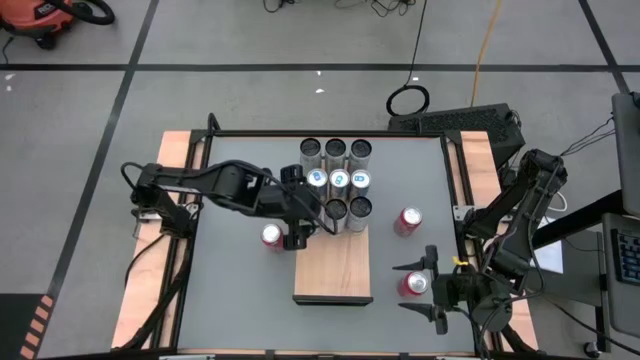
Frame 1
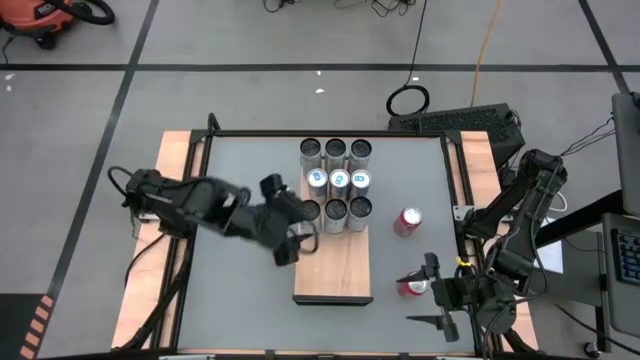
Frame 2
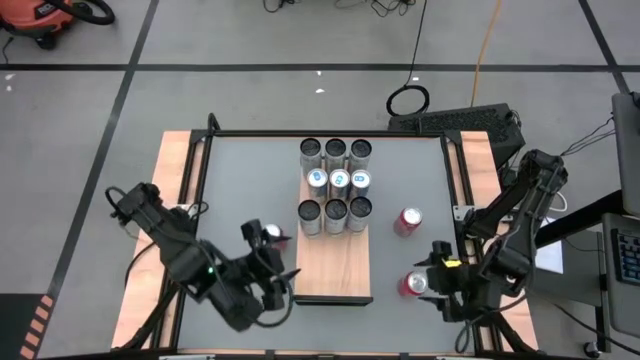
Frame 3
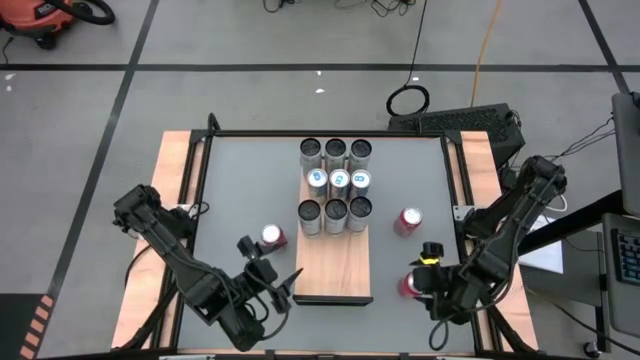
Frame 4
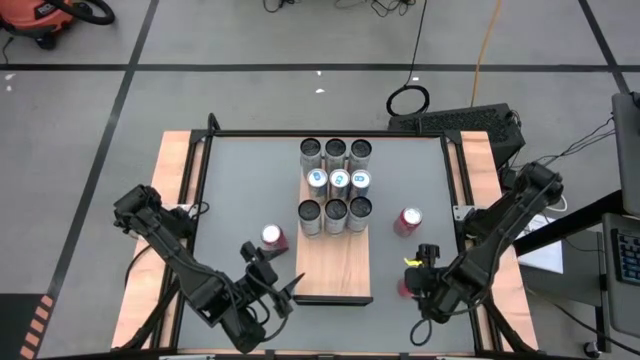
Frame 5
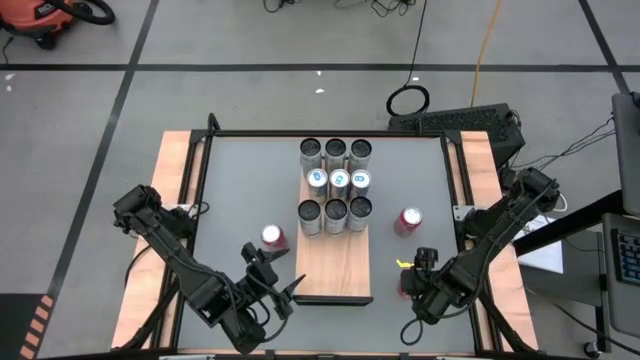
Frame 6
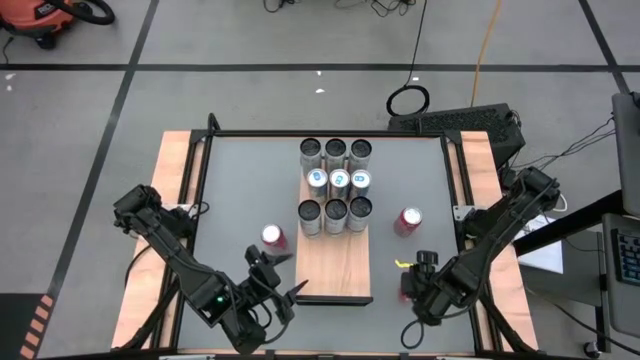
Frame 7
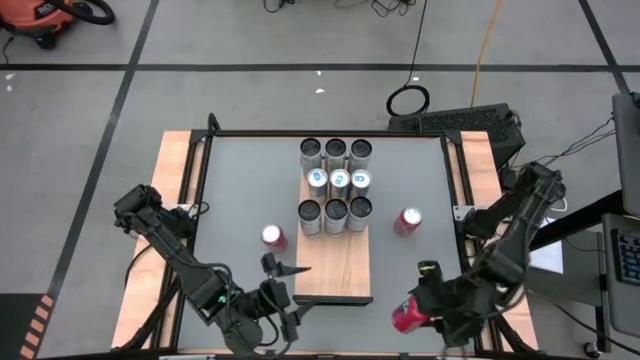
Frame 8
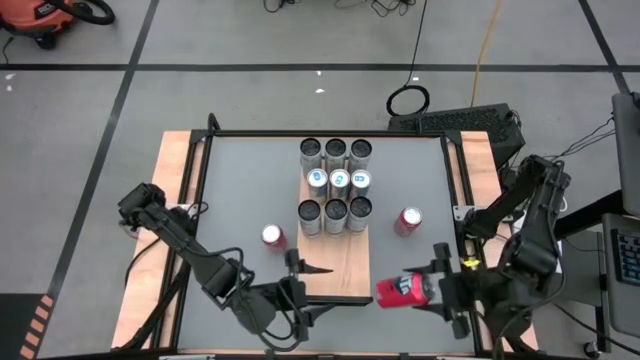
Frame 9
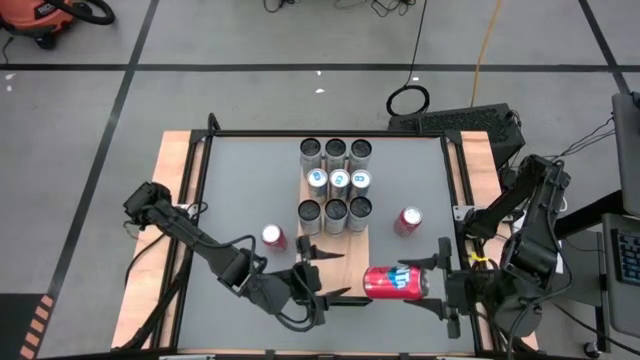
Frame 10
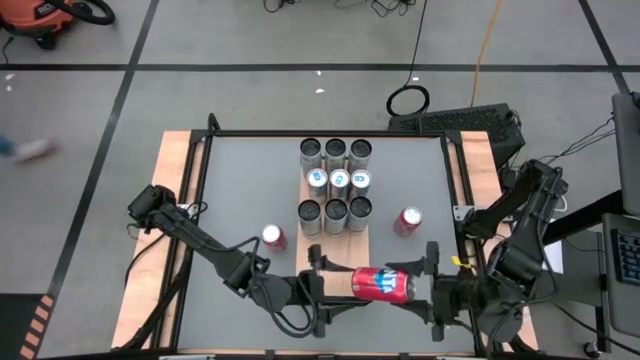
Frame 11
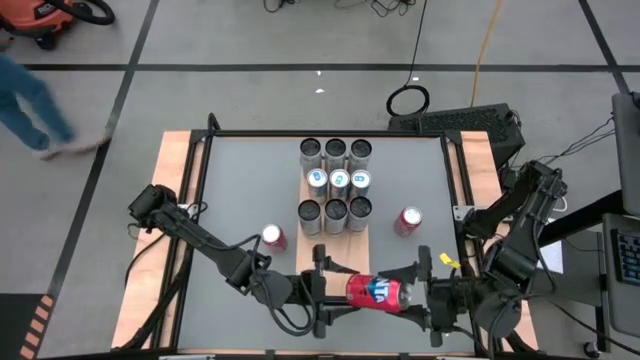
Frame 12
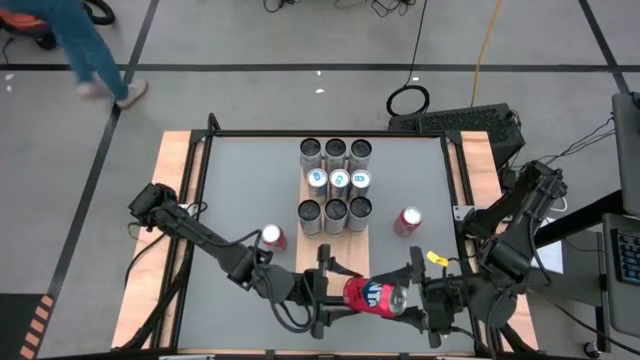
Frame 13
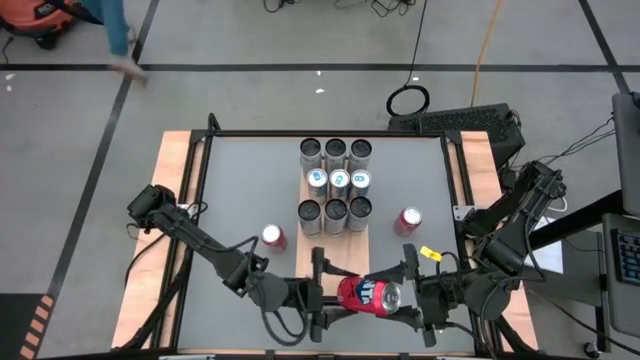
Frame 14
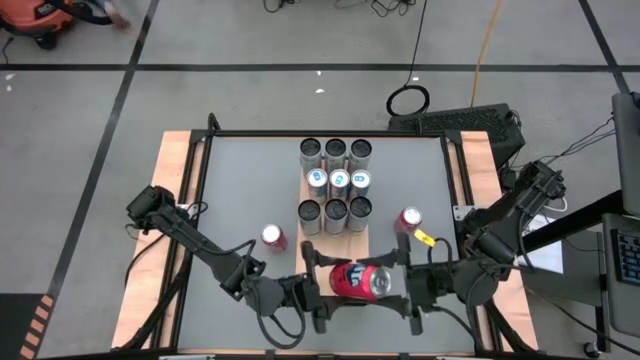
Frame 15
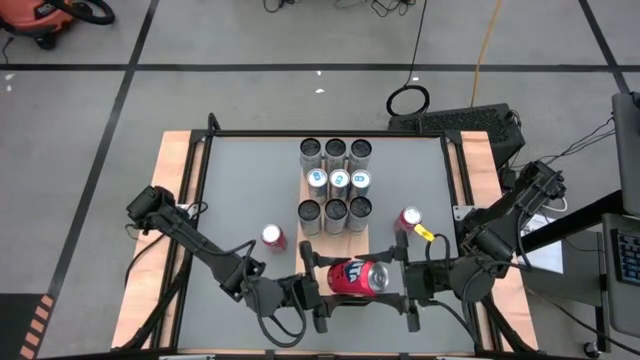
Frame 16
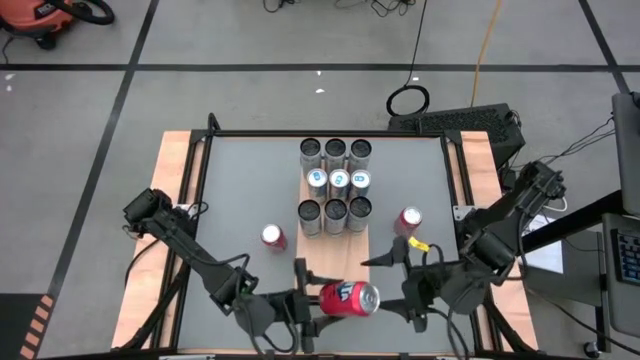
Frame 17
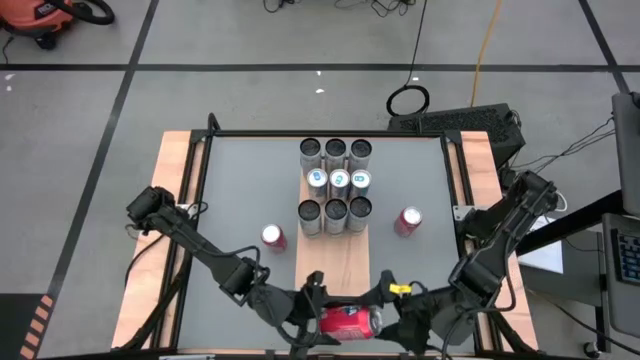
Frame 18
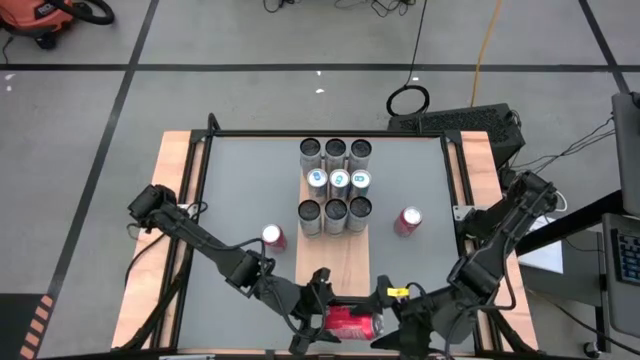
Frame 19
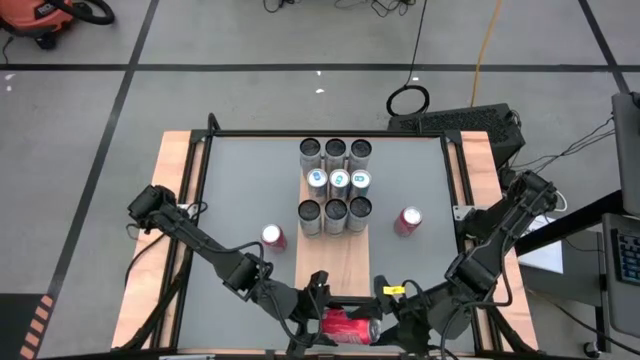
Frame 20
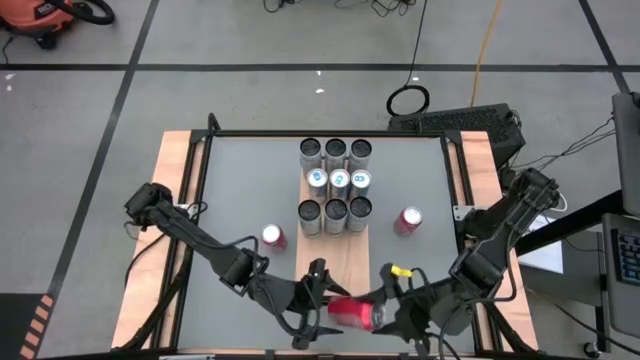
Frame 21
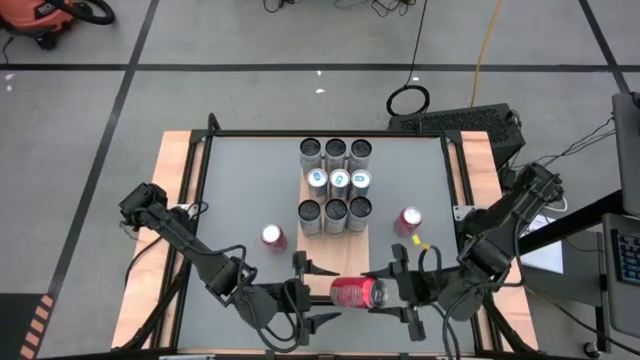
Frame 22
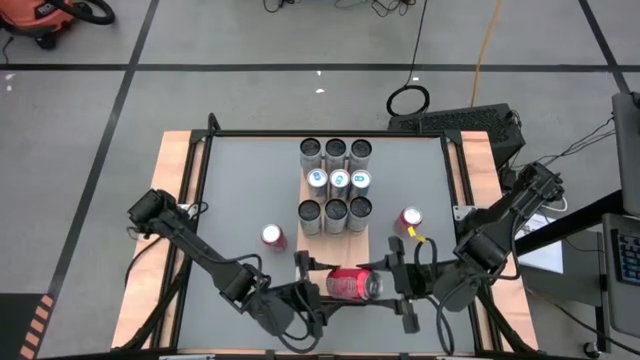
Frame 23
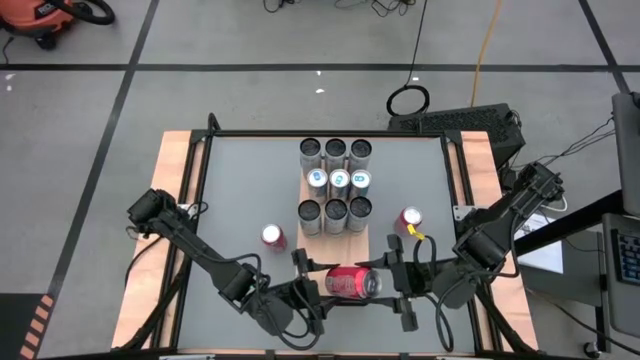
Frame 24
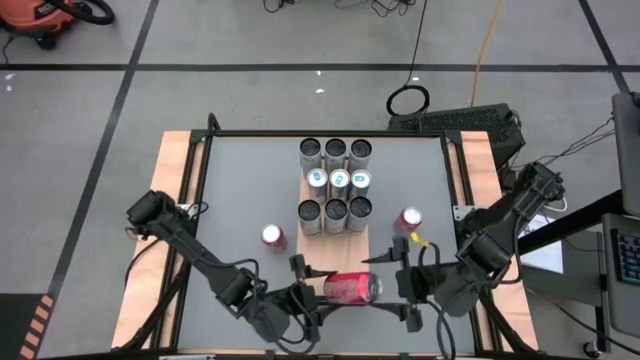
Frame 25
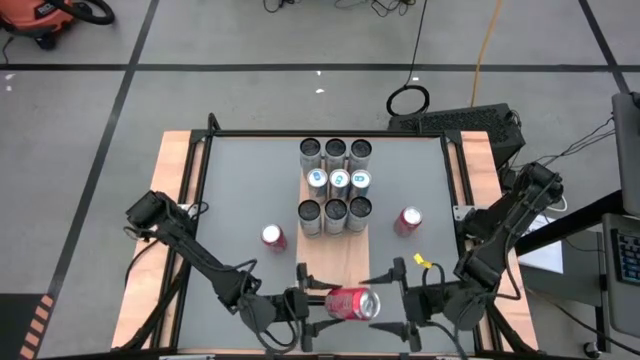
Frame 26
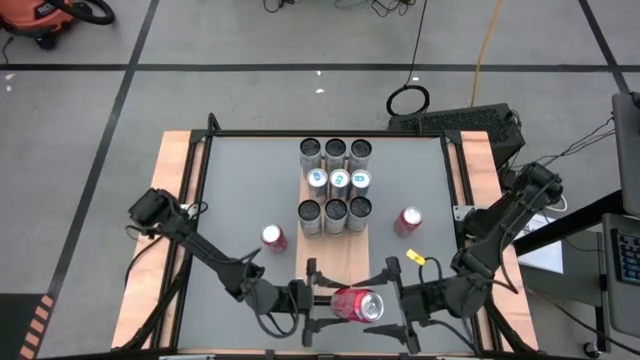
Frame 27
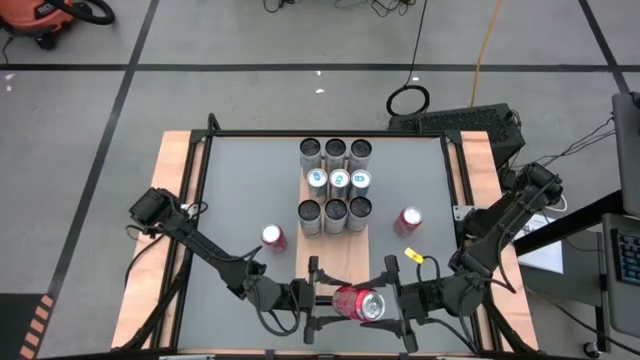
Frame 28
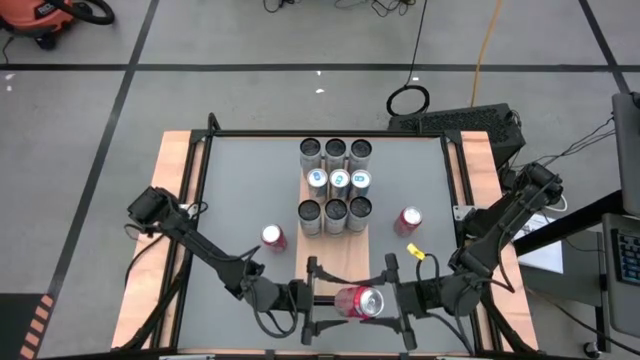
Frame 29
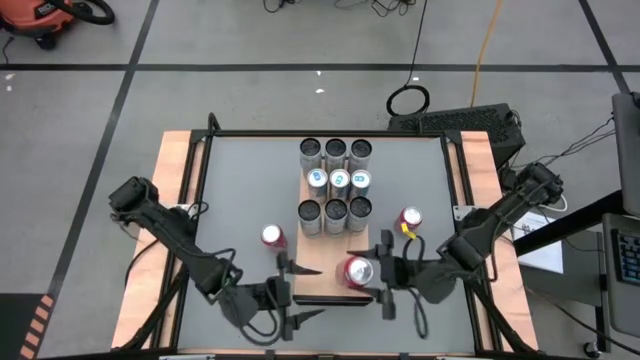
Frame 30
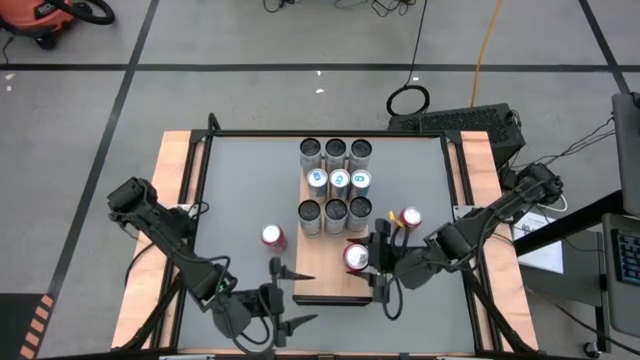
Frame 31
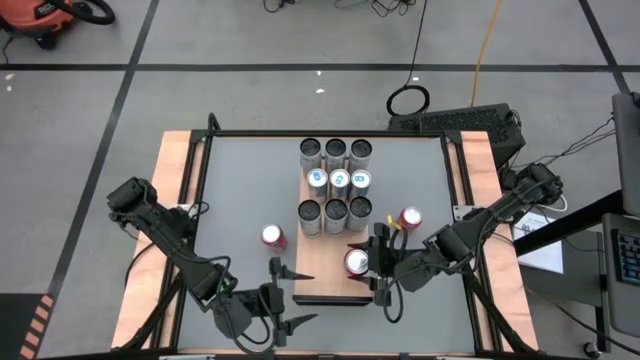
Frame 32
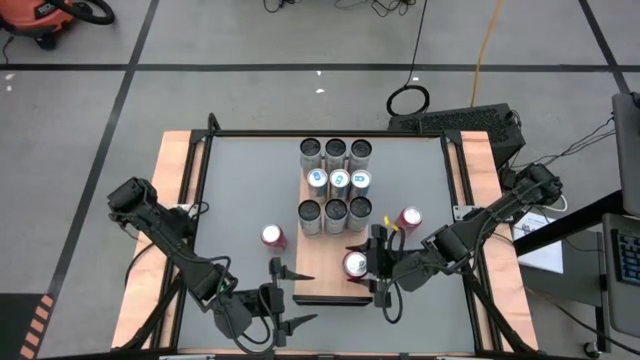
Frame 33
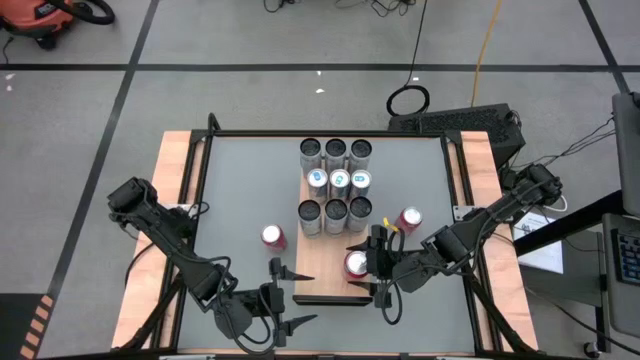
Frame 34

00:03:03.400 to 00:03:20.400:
Task: Place canned beverage on shelf
Put the bottom red soda can on the shelf

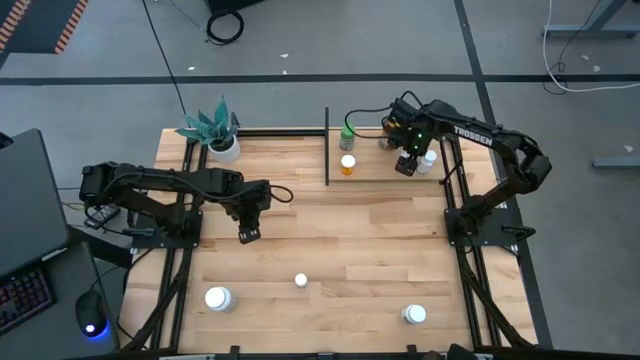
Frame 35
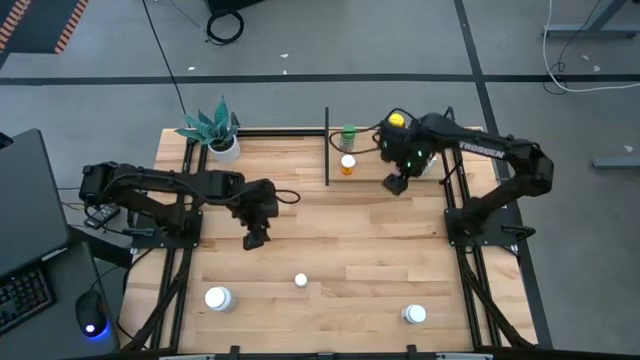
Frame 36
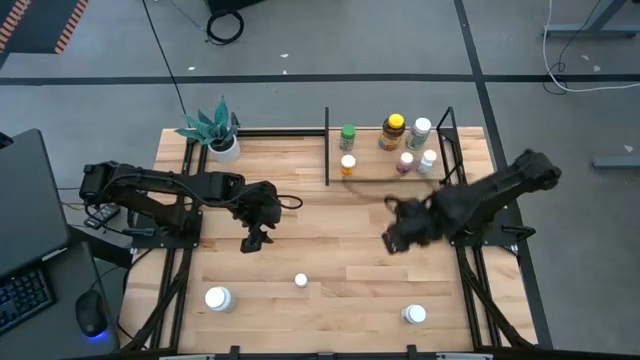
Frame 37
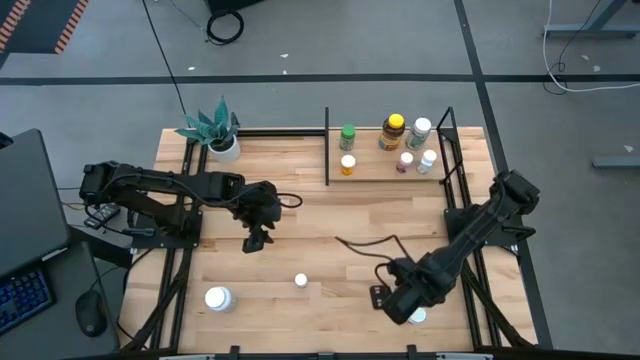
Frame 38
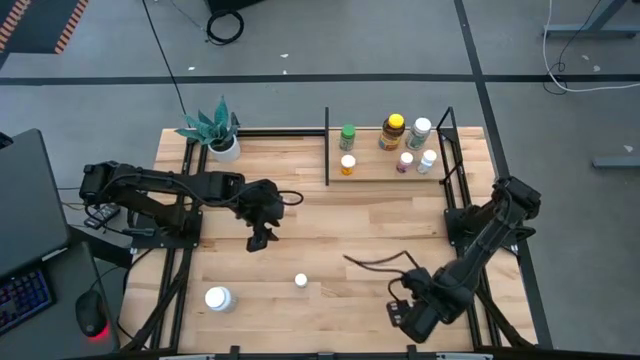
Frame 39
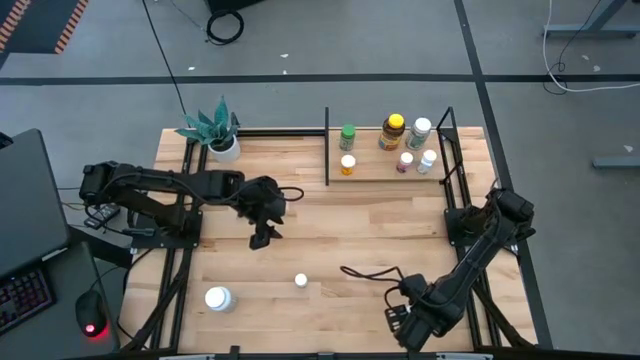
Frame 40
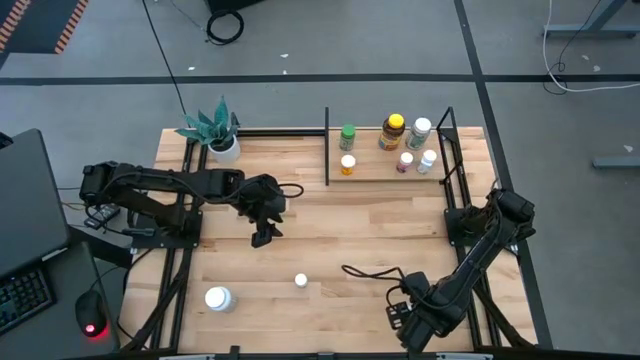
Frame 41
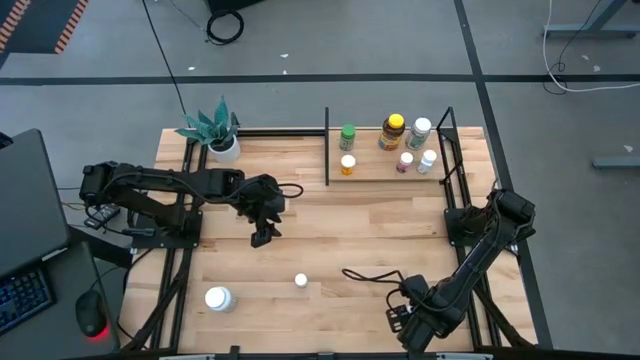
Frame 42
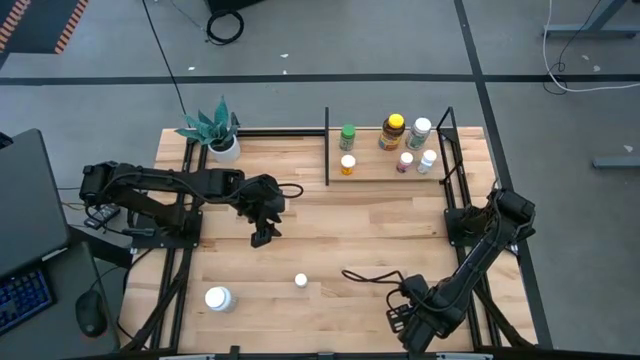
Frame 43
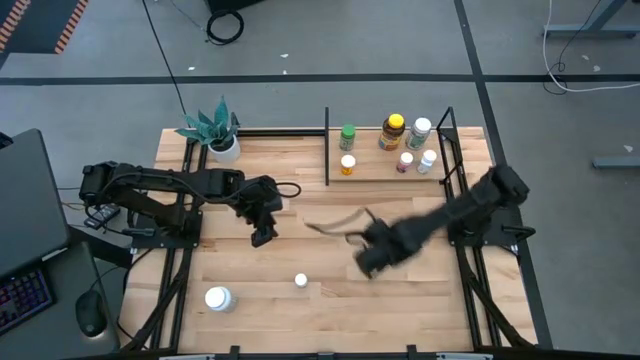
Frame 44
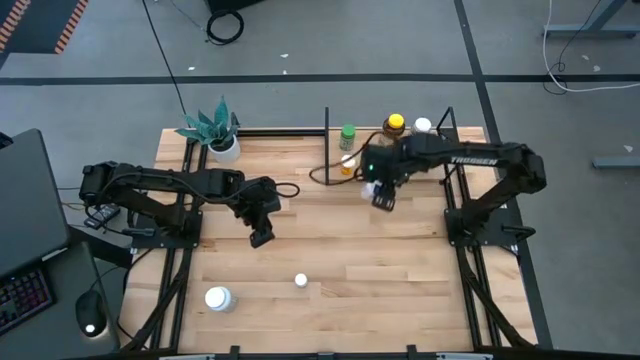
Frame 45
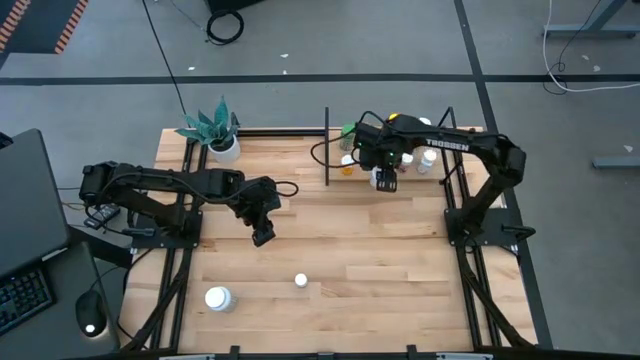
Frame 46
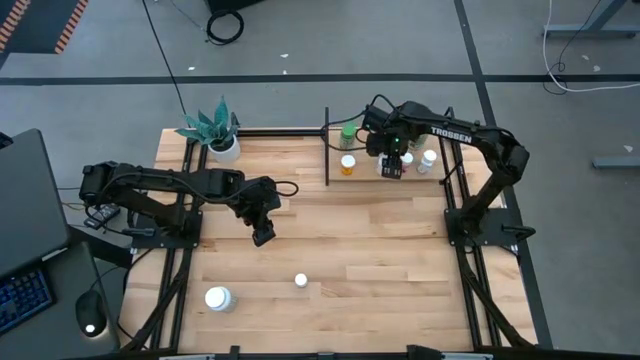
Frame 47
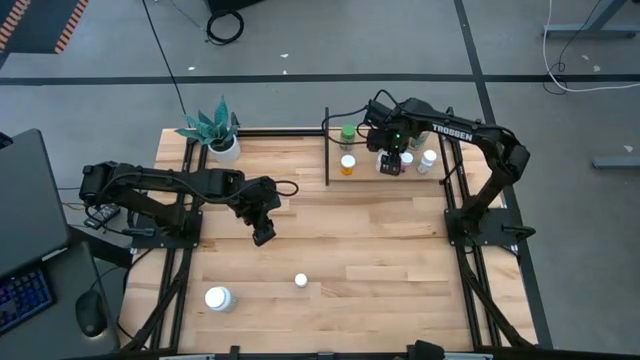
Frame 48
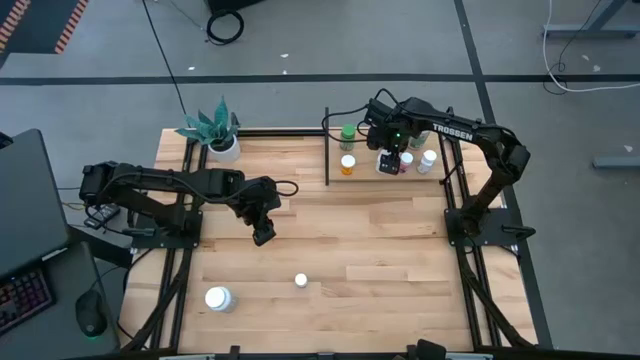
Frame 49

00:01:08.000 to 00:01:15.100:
Task: Pick and place medicine bottles onto shelf by color
Put the white pill bottle on the shelf
